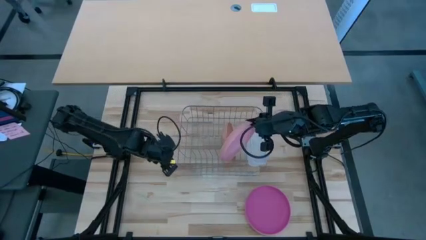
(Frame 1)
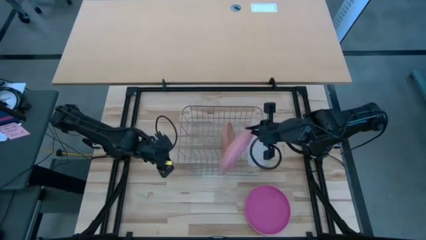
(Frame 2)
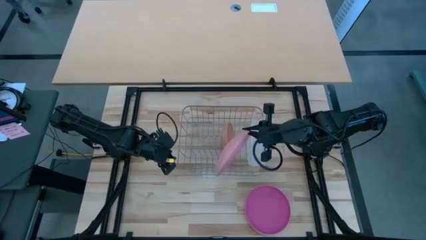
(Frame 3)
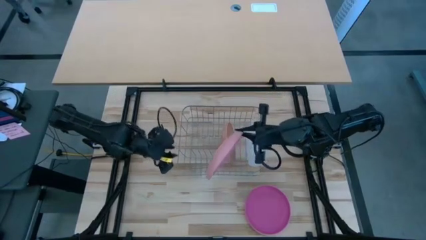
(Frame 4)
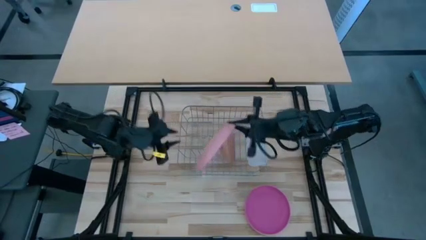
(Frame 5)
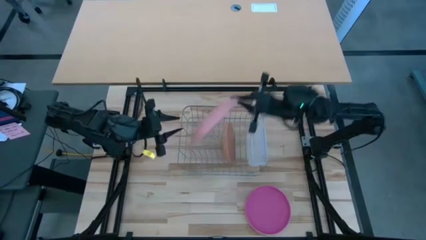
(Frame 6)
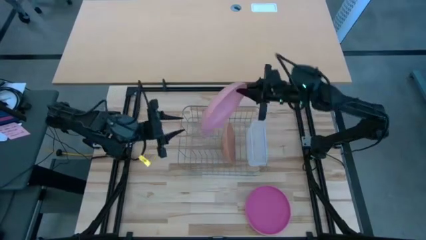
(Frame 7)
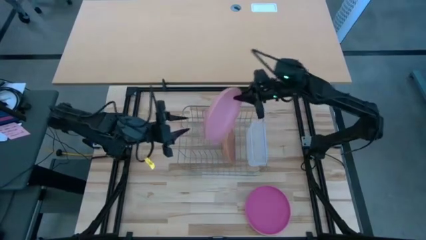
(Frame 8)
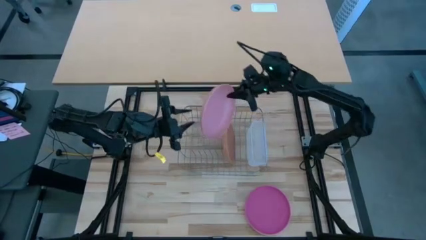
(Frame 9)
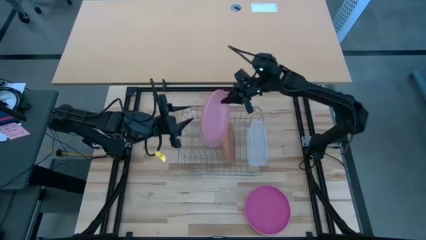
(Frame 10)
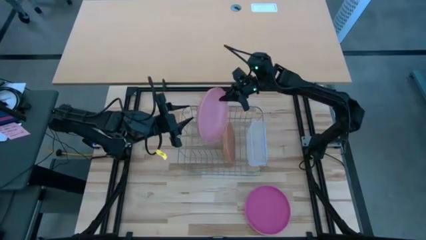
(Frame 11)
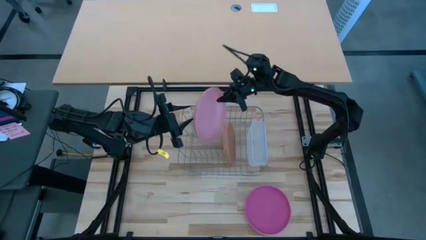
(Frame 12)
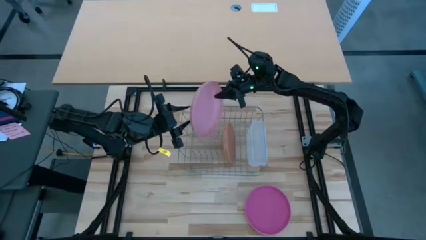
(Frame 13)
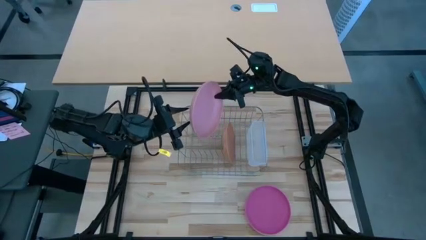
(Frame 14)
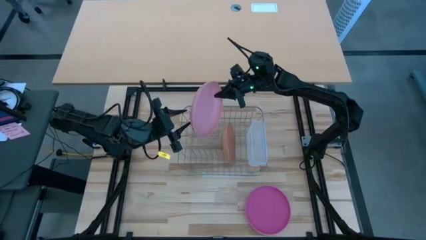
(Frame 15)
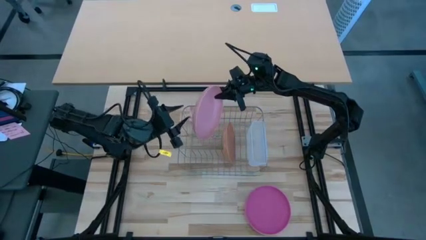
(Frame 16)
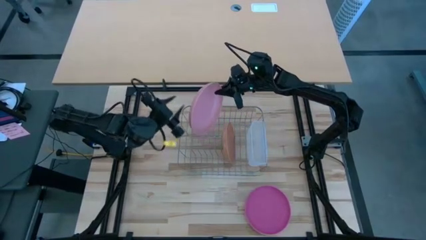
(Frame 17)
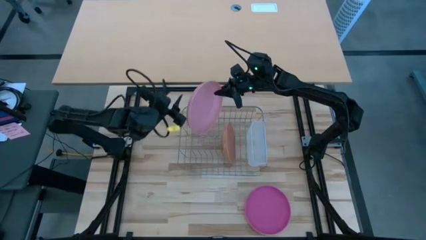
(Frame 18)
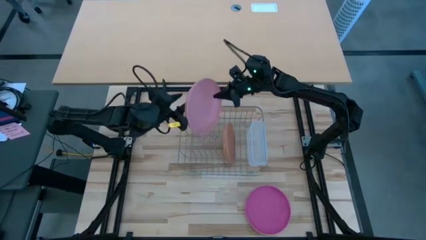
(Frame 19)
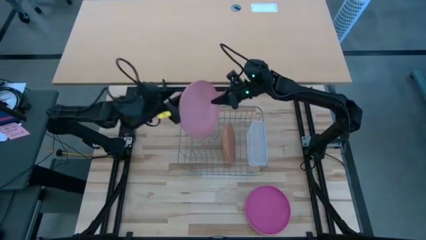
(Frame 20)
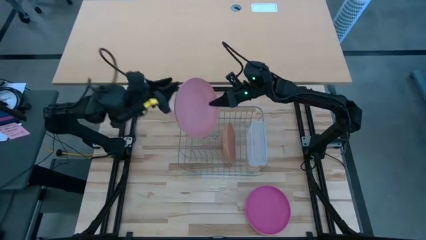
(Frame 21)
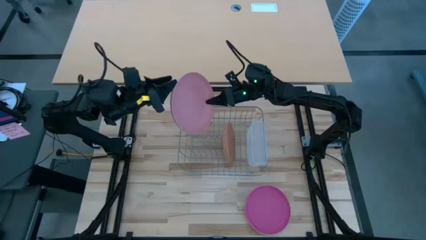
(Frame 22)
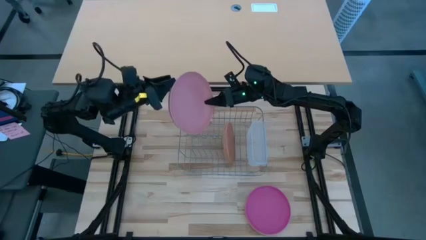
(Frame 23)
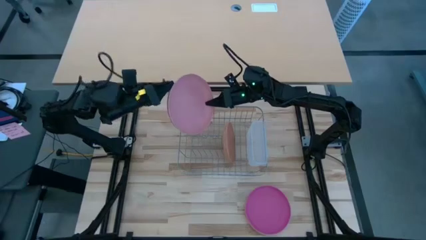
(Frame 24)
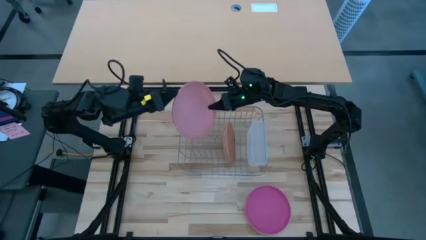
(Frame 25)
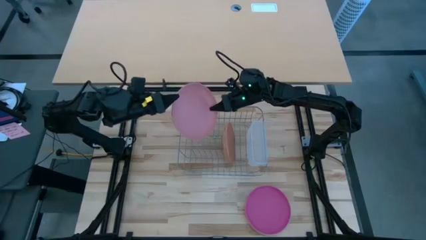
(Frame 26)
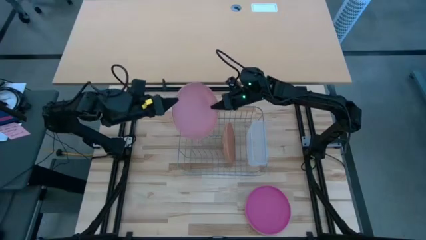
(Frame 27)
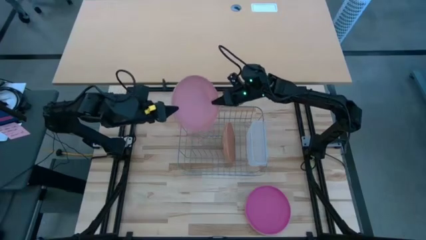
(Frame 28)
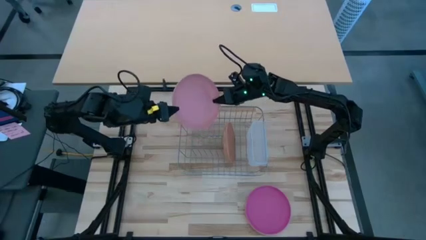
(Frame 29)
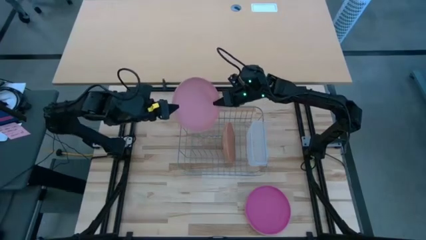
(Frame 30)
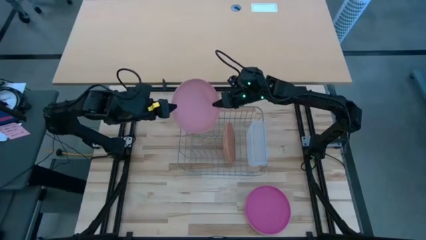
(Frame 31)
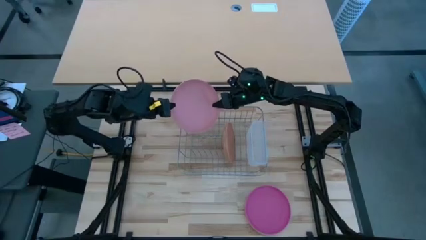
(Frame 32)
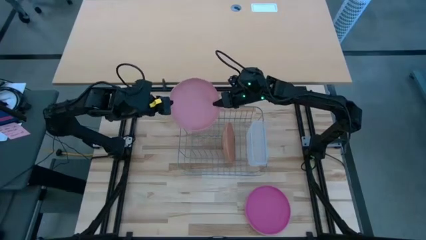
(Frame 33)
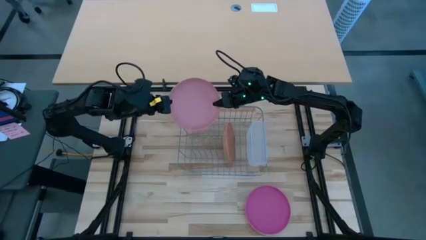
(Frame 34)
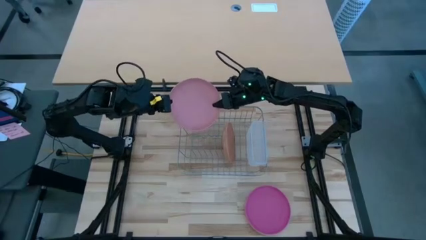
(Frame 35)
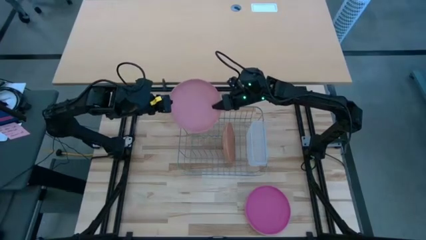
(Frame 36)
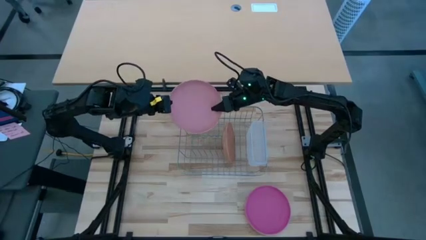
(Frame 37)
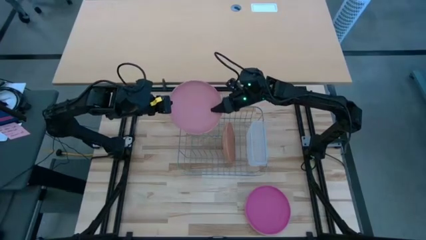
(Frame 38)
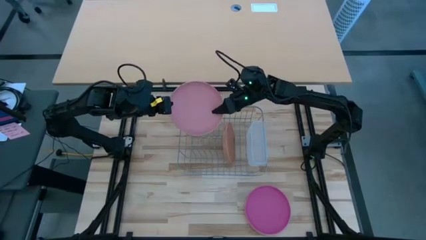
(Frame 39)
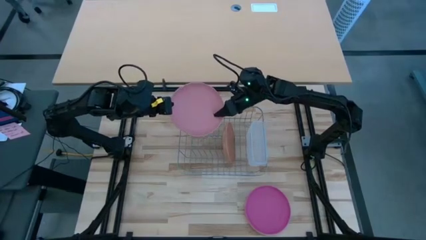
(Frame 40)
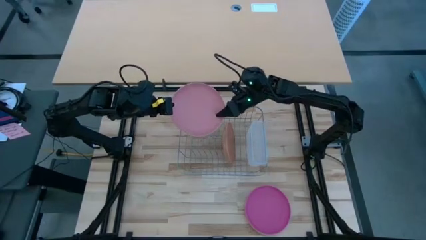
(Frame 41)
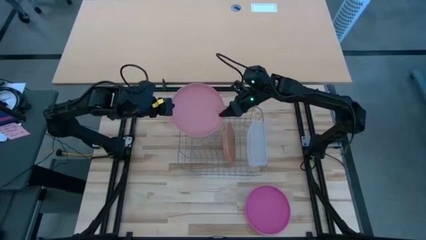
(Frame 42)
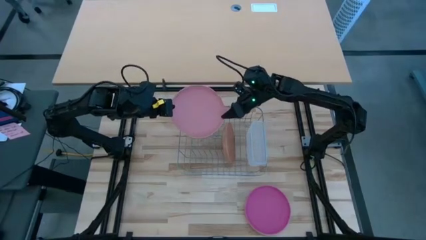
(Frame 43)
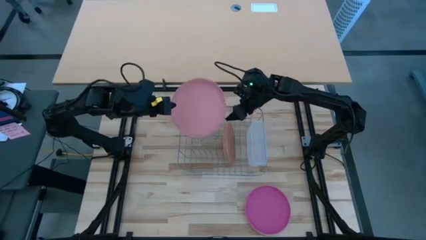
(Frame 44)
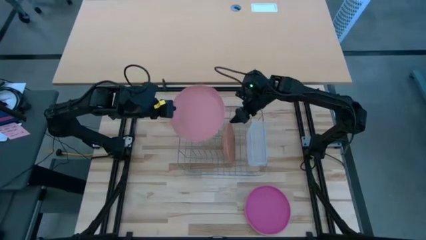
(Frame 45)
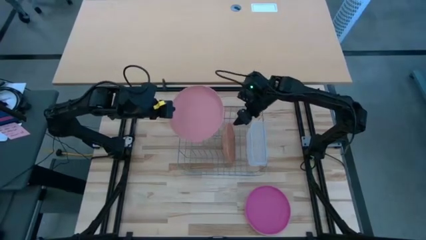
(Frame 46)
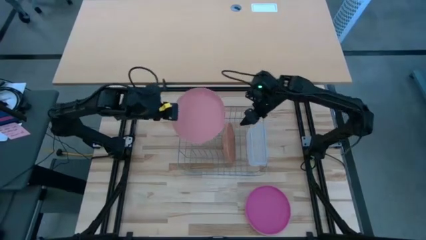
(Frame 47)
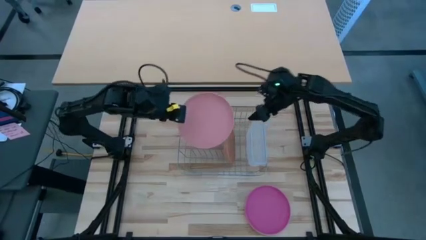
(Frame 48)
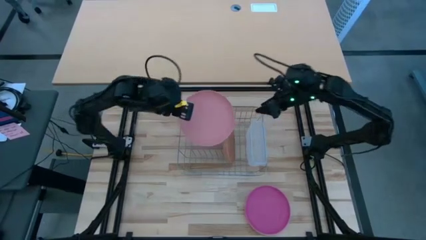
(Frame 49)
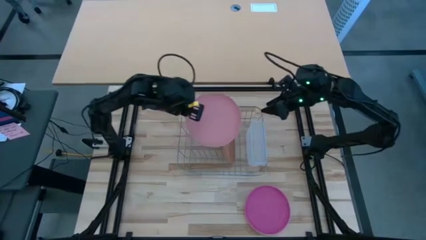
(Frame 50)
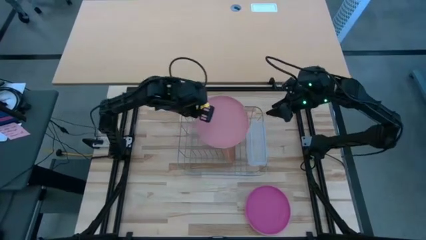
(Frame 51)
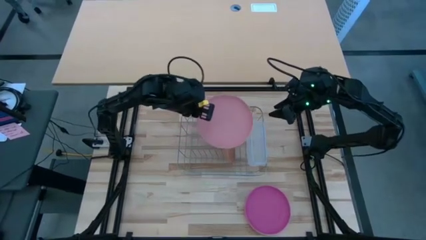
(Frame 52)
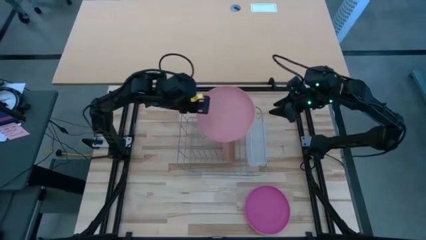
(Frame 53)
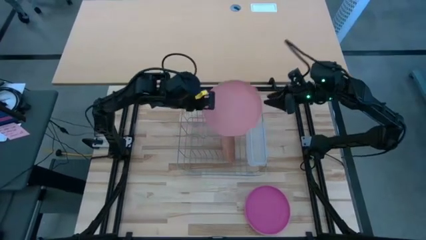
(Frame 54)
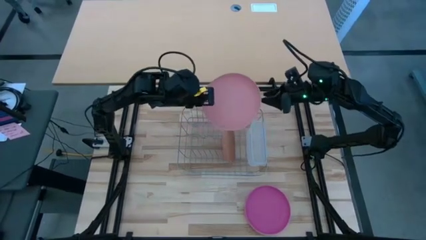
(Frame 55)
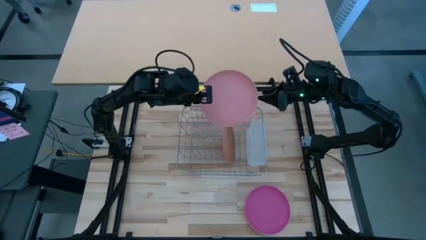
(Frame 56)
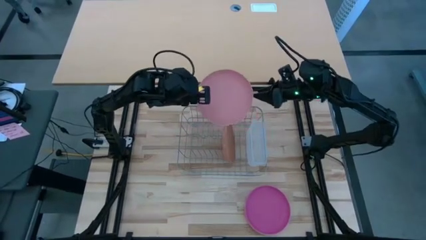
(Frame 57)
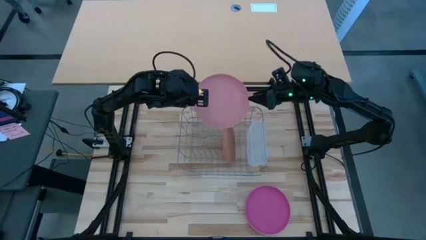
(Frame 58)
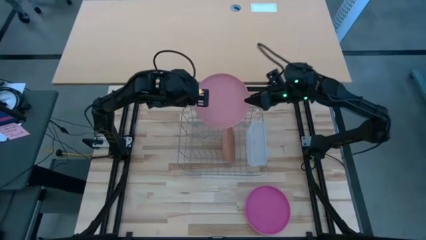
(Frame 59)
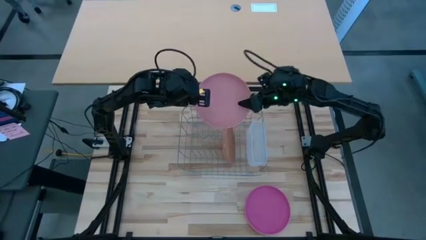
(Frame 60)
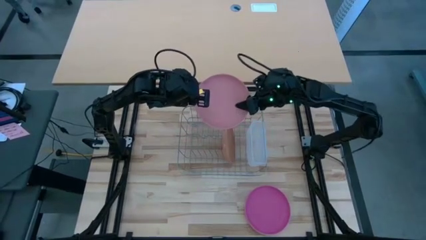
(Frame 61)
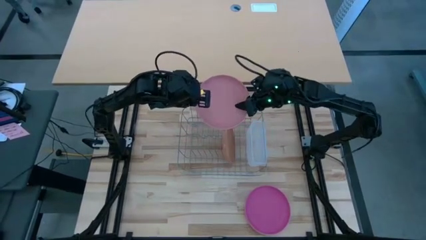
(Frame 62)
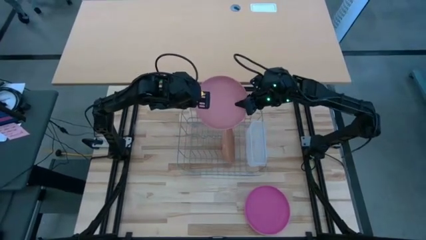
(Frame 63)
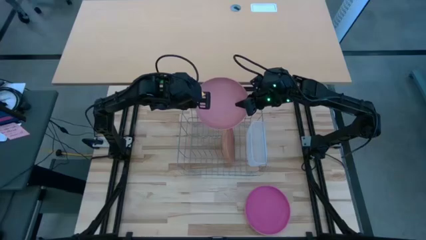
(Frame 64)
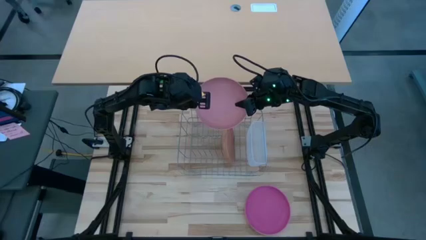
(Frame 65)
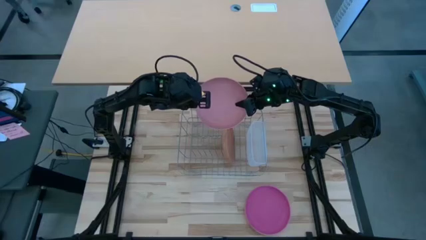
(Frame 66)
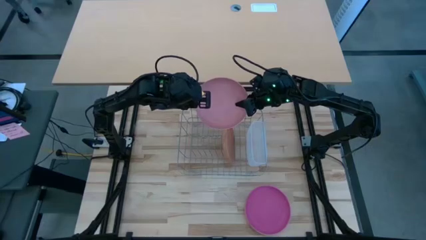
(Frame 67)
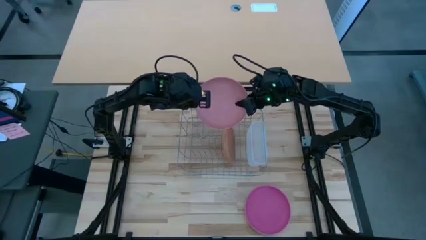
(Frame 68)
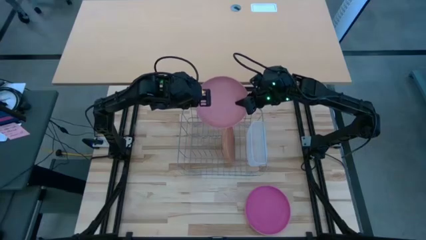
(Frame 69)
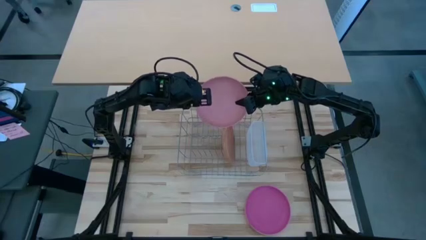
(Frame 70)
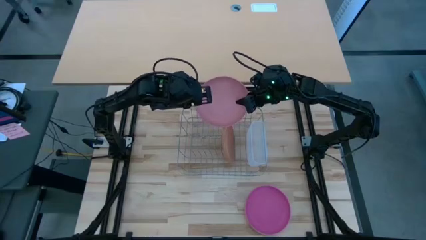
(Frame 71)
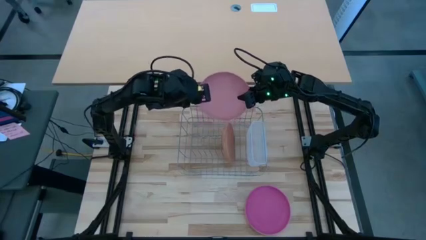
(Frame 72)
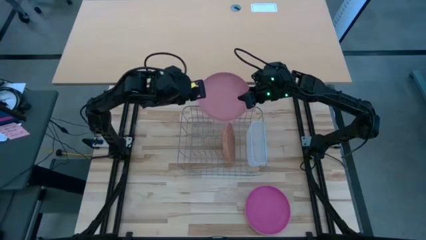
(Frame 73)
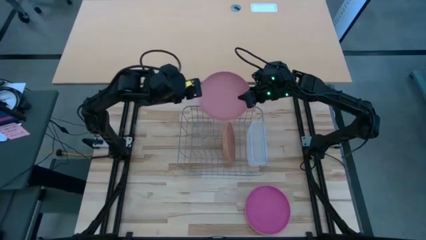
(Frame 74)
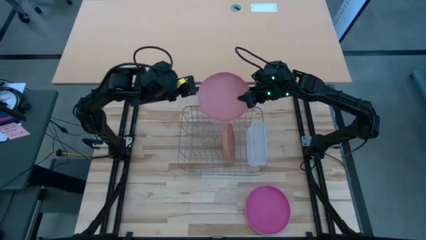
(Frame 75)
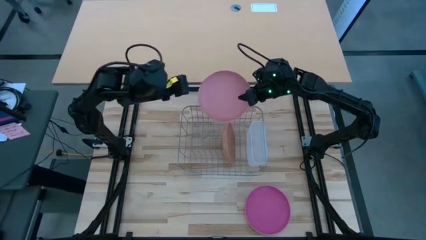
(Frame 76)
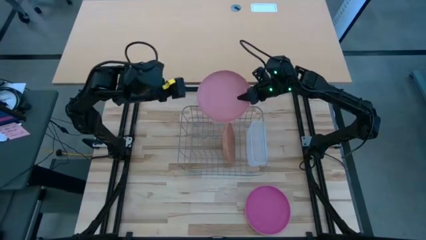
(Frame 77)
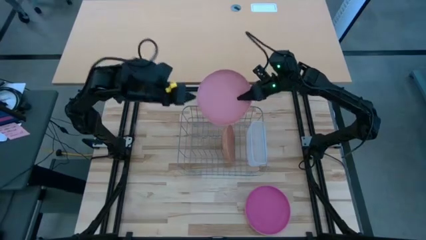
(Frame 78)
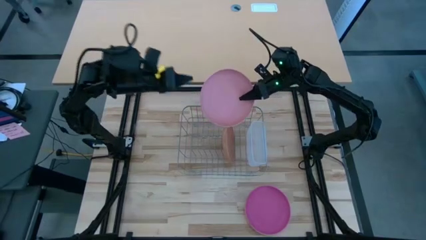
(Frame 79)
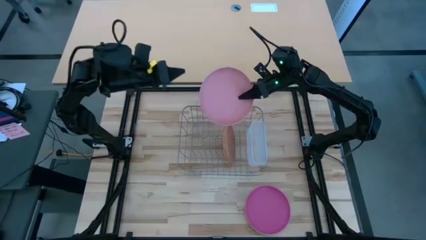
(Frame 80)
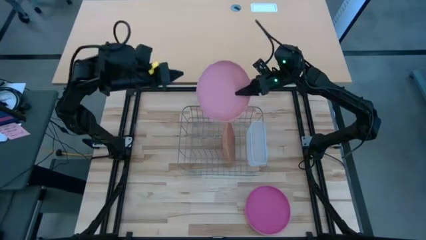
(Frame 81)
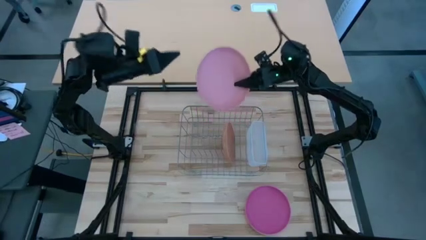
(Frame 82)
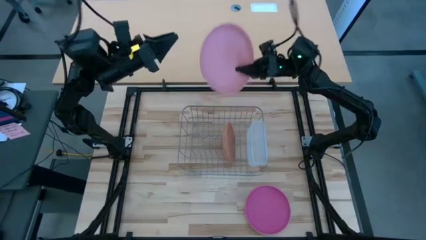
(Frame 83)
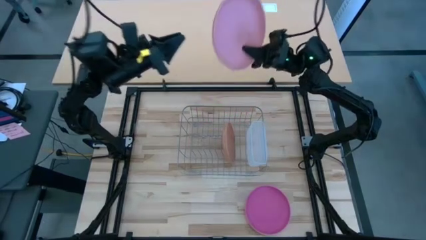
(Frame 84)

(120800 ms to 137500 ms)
Task: Sort dishes
Put the light pink plate in the dish rack
